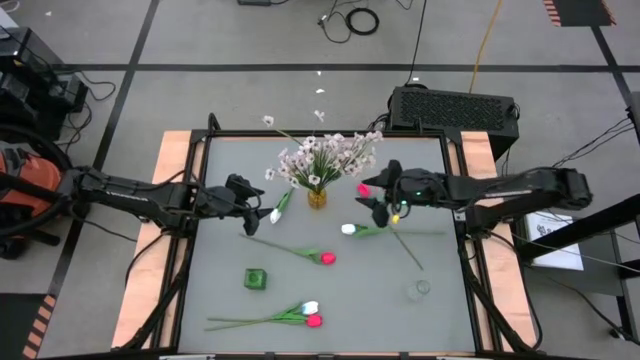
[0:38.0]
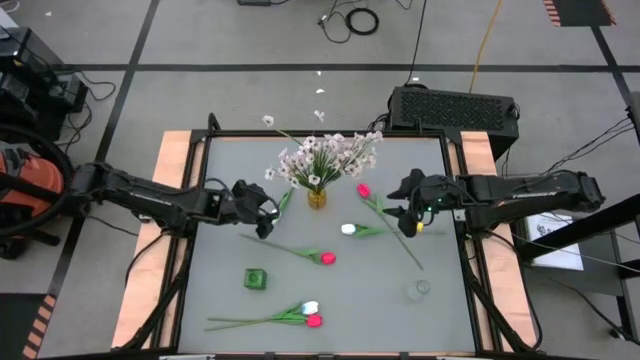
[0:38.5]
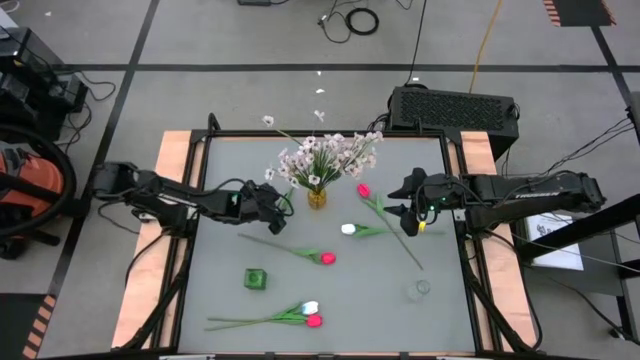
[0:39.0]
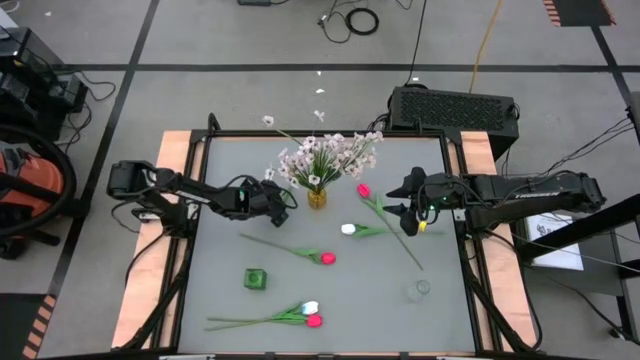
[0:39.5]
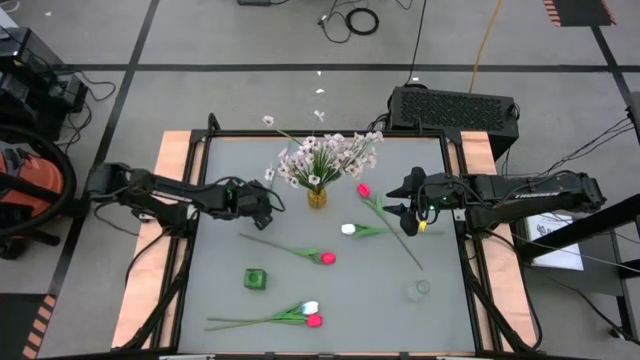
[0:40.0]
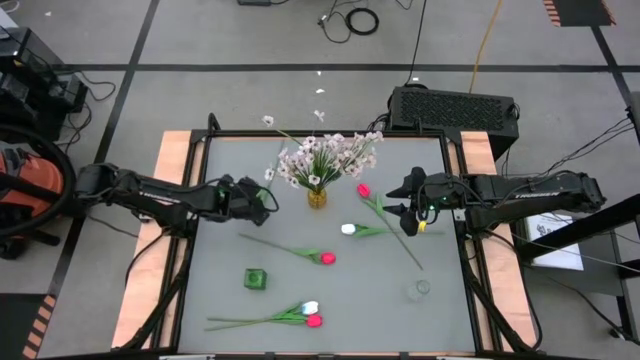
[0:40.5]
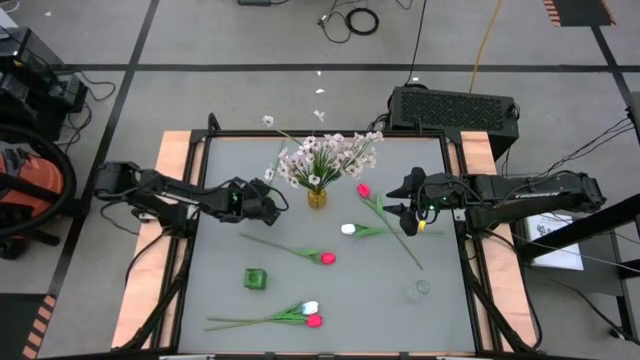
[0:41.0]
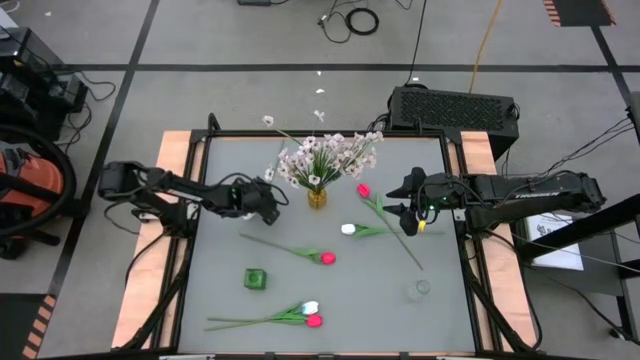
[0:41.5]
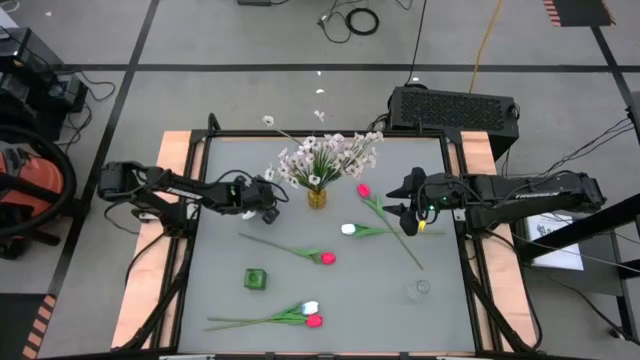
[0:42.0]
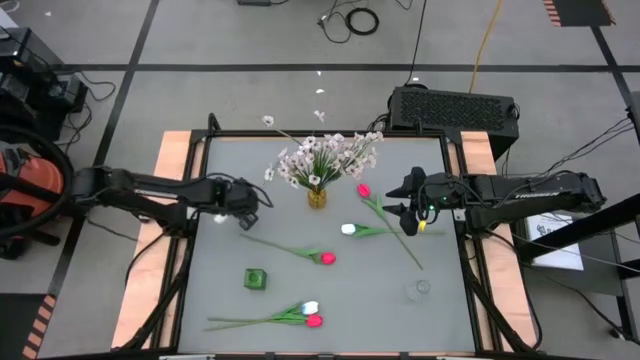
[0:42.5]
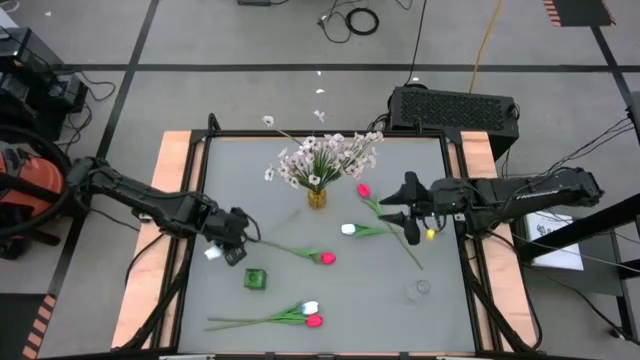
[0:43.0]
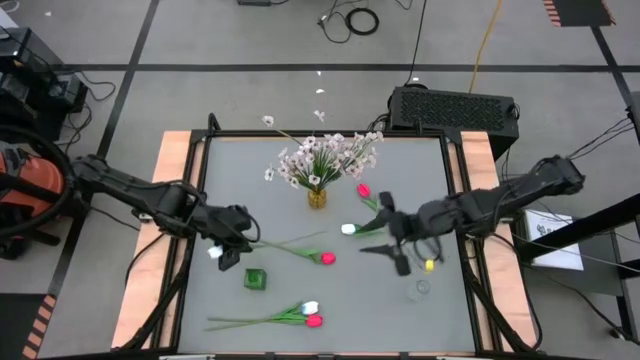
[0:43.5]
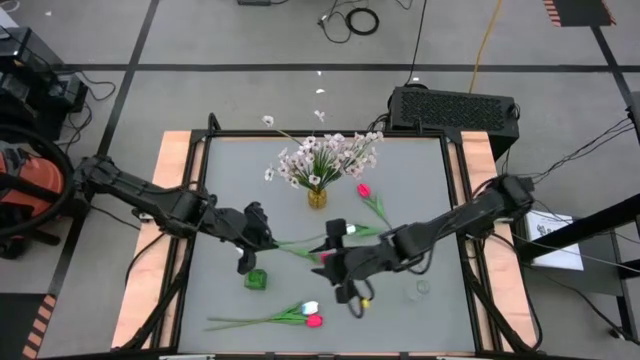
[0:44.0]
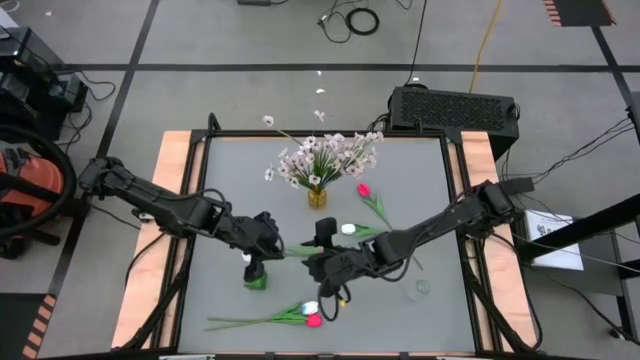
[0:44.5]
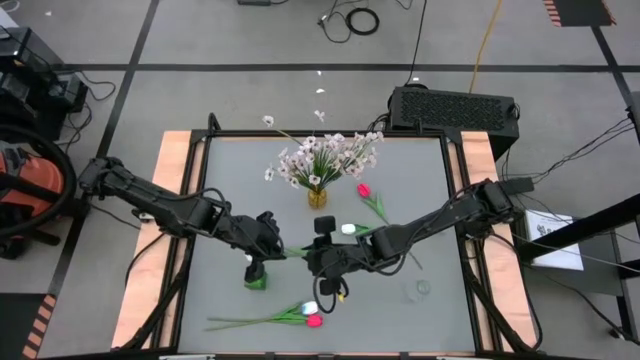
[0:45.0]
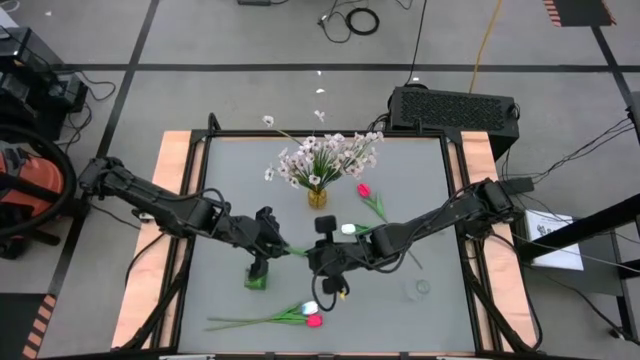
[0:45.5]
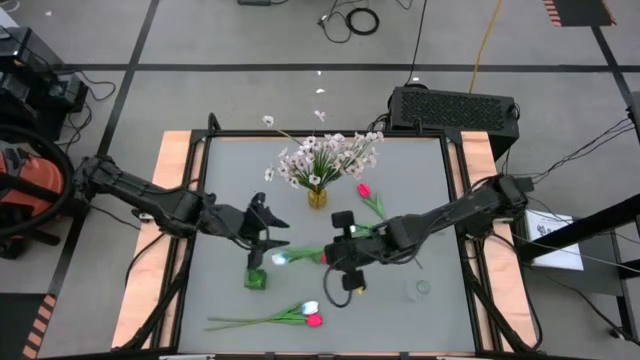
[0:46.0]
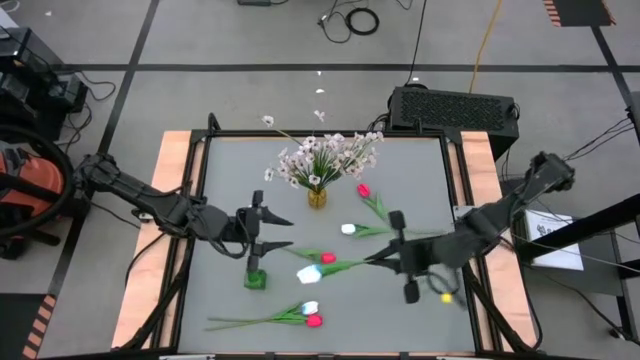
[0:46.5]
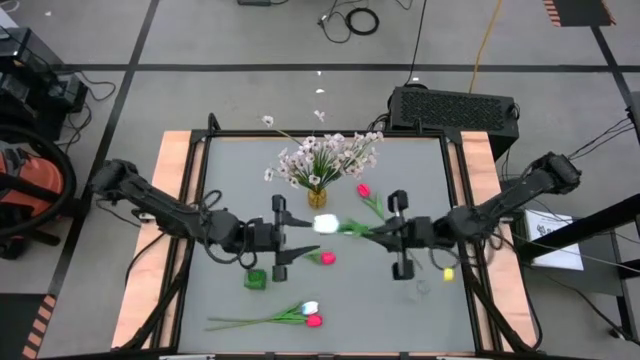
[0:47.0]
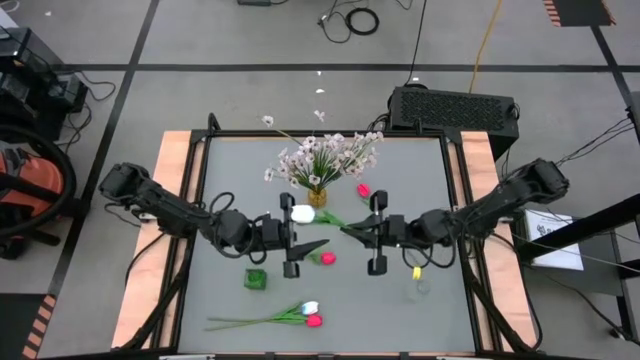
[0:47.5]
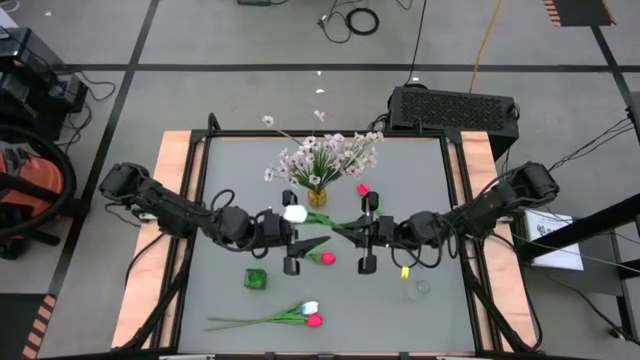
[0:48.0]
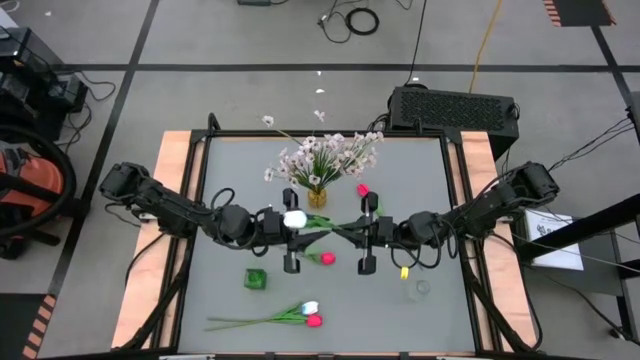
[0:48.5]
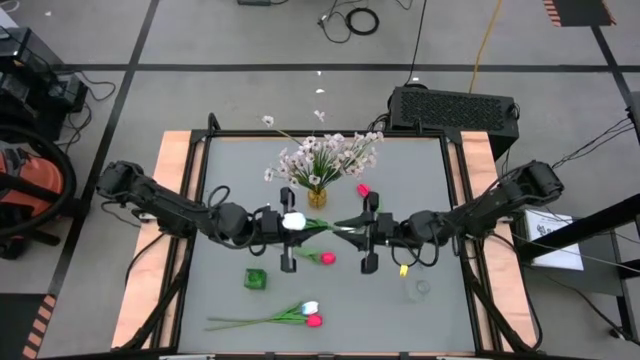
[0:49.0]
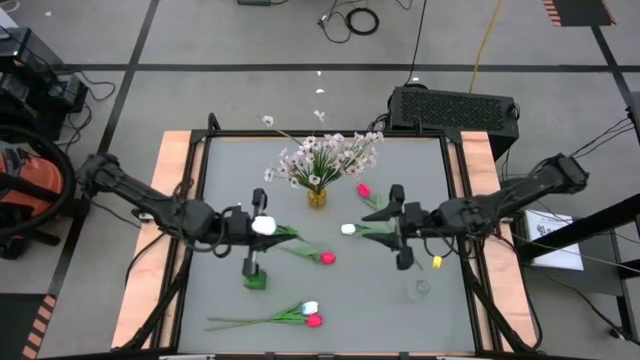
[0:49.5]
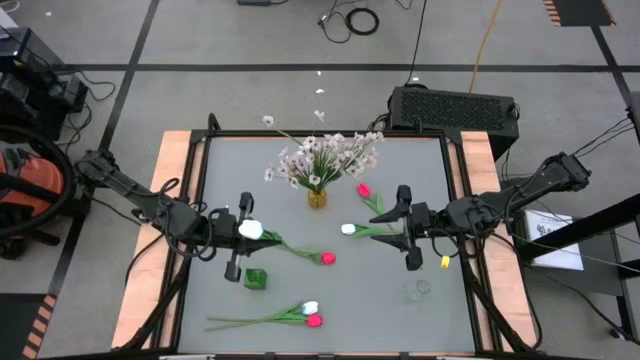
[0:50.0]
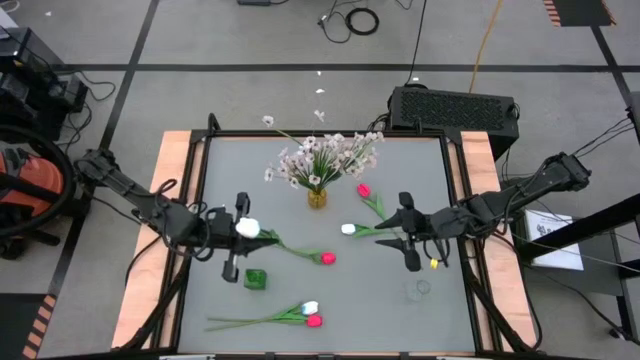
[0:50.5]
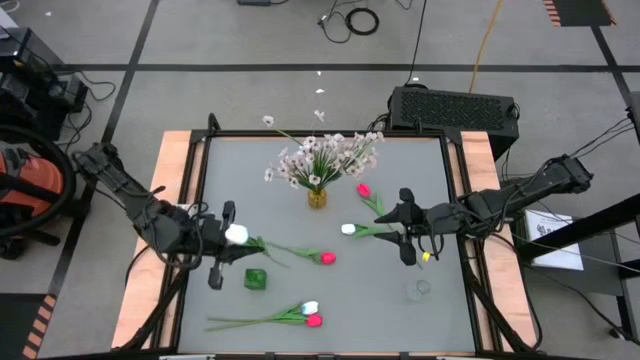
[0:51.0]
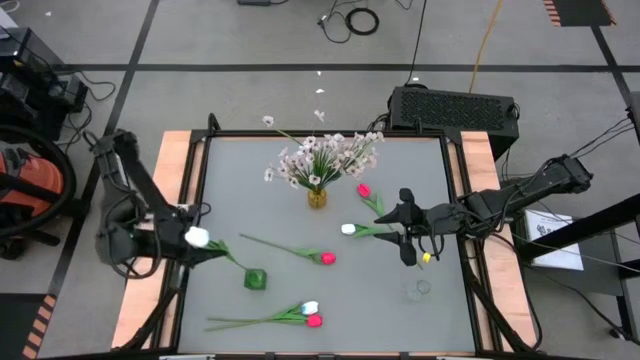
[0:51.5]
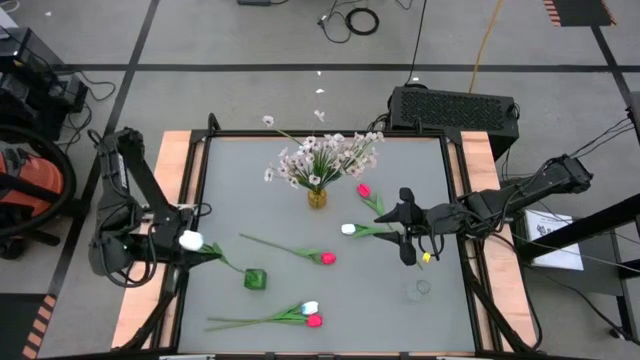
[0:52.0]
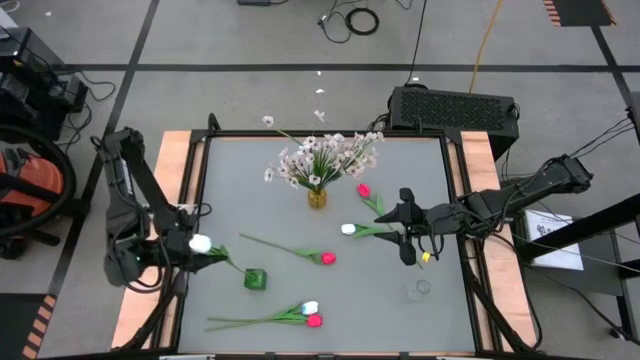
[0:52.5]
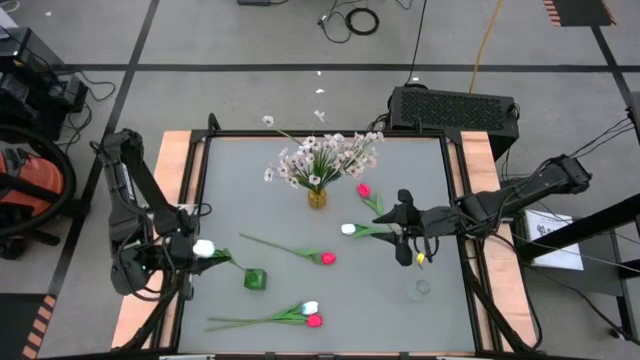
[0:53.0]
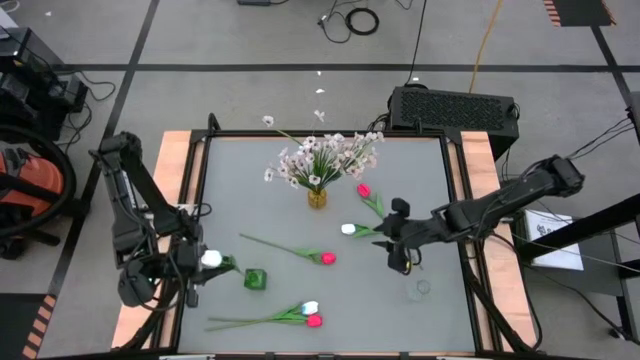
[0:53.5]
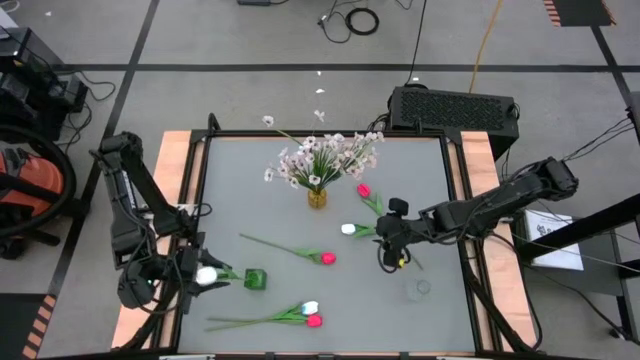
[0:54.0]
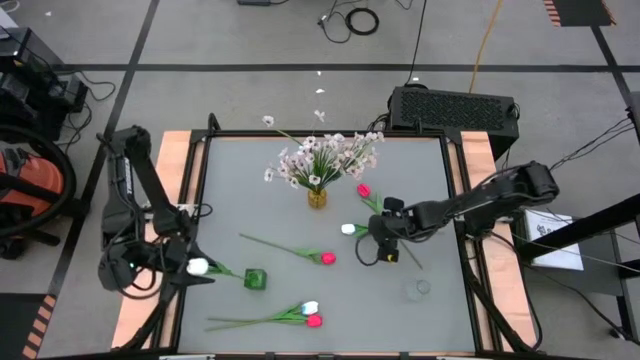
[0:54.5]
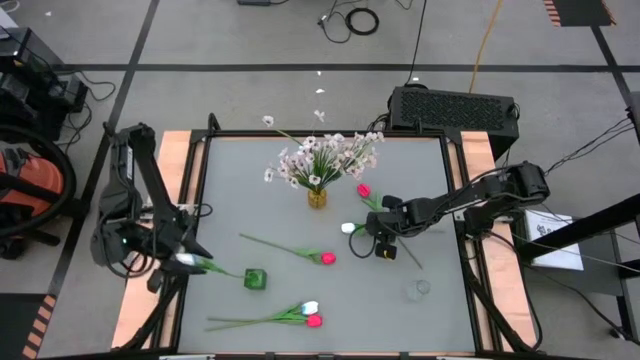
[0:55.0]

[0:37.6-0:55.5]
Task: Sort flowers into vase by color
Put the top left white flower into the green vase

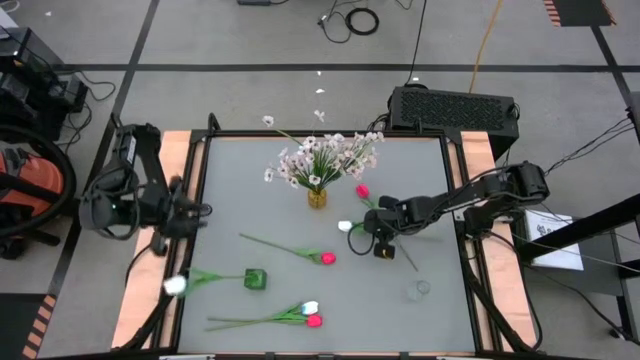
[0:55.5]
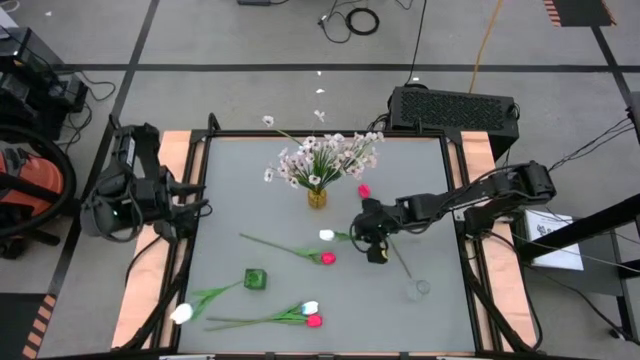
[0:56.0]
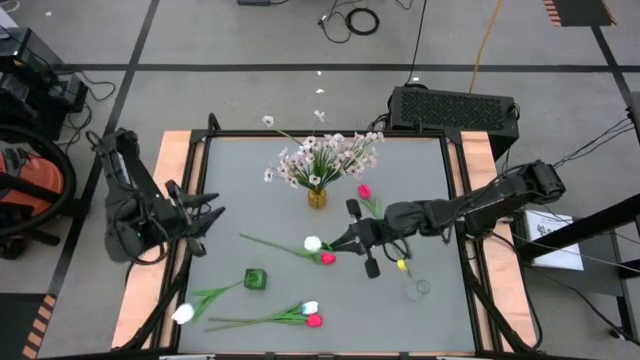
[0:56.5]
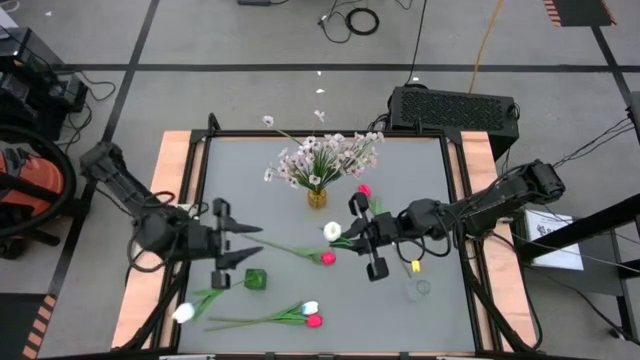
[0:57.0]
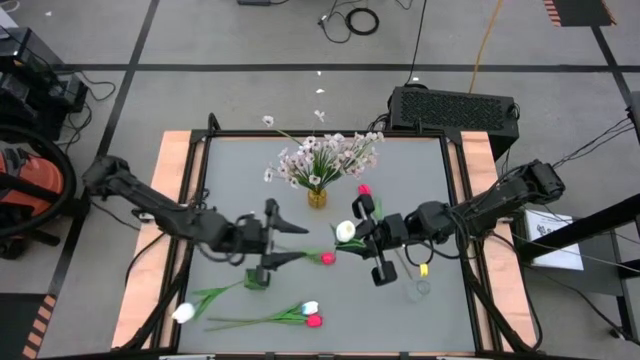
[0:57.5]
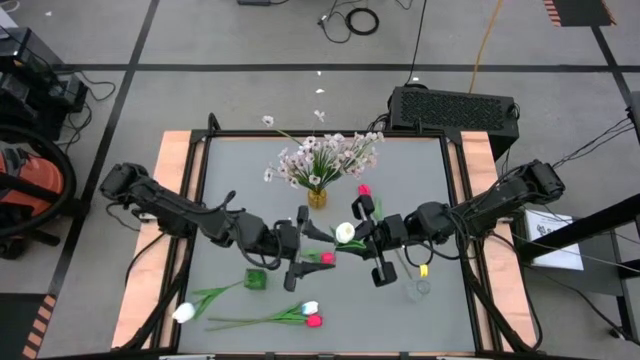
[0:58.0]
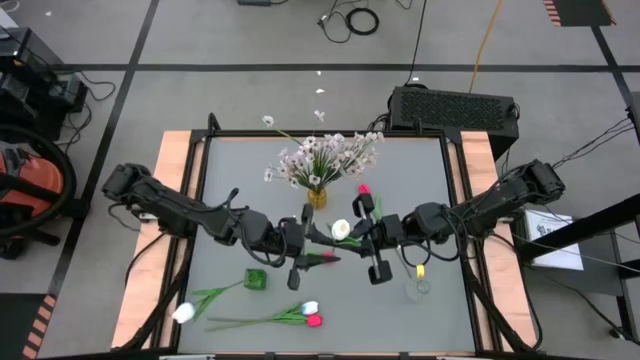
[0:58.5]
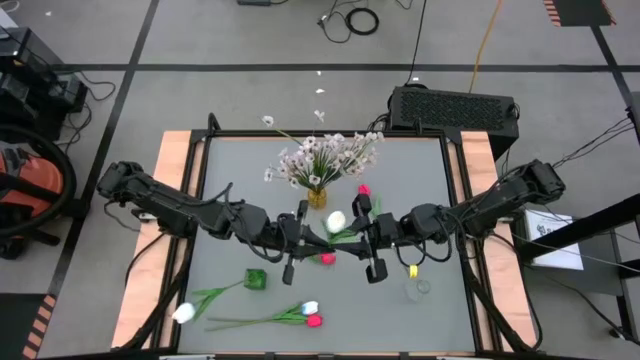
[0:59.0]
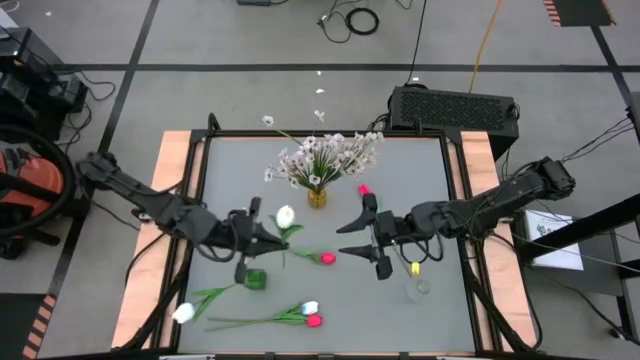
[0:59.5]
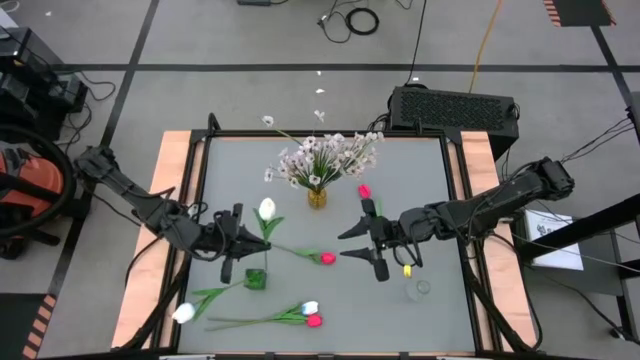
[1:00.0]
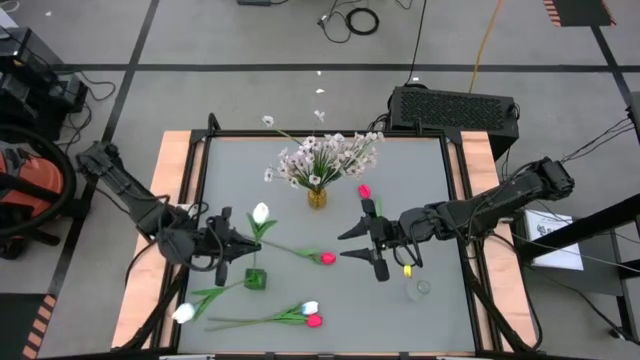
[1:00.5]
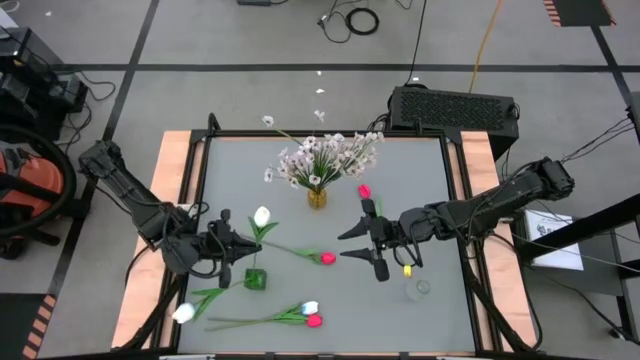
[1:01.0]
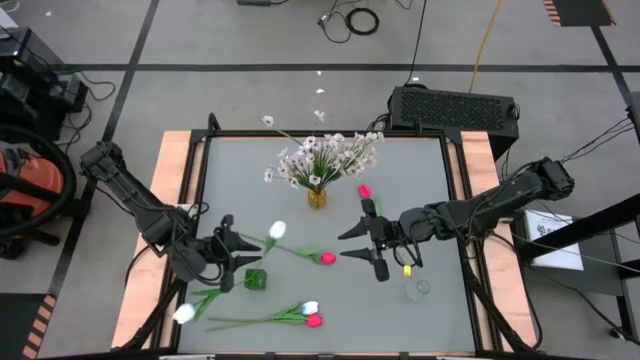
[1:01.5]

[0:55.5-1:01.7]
Put the top white flower into the green vase
